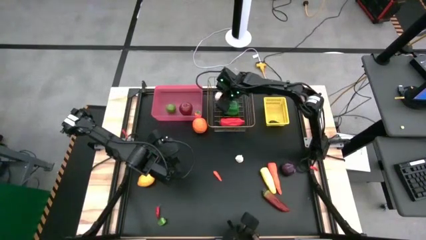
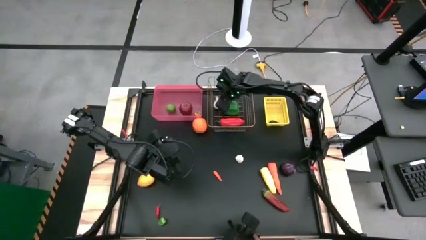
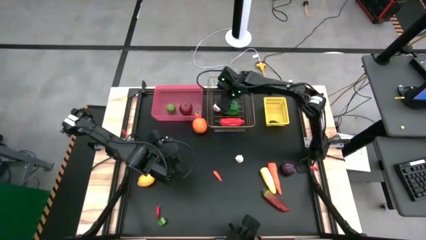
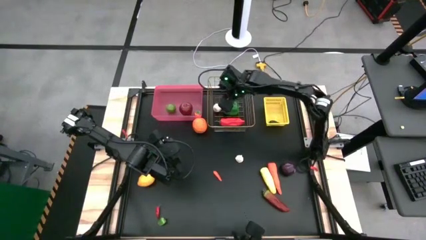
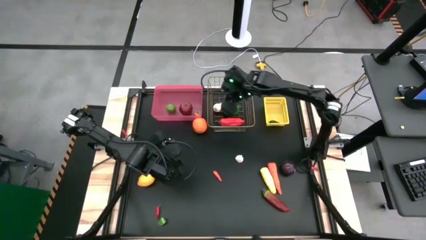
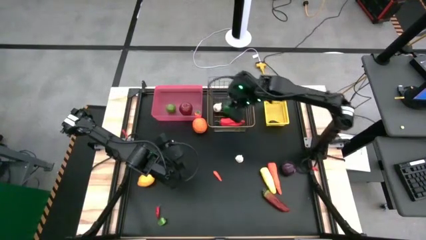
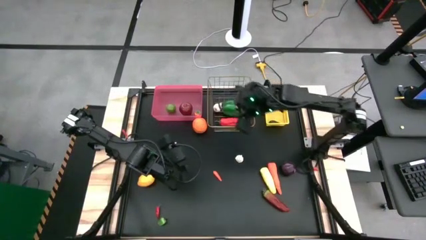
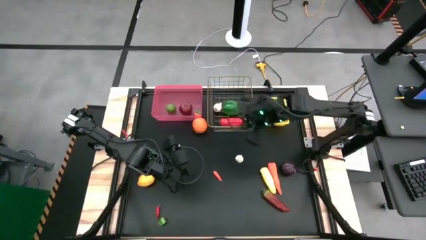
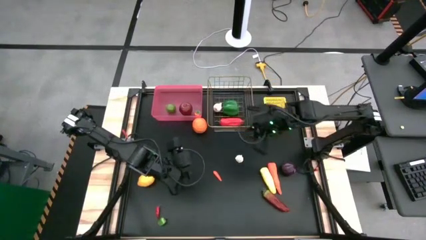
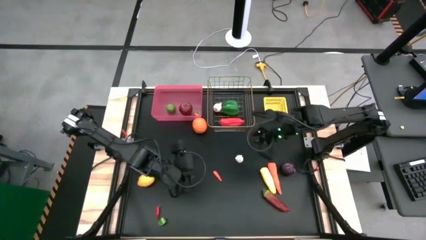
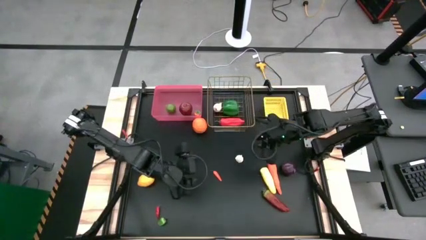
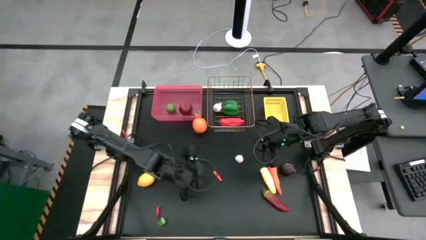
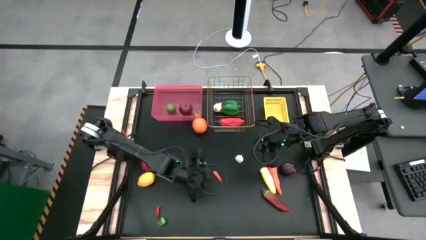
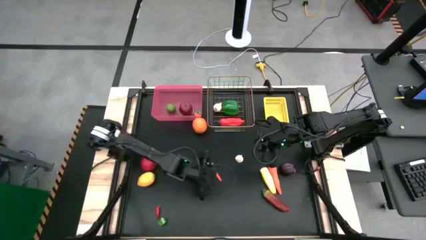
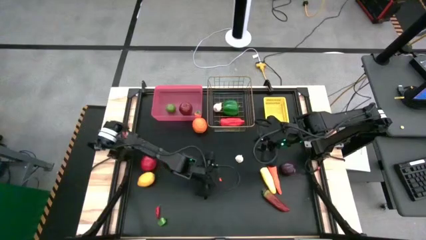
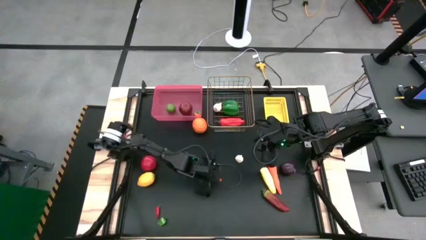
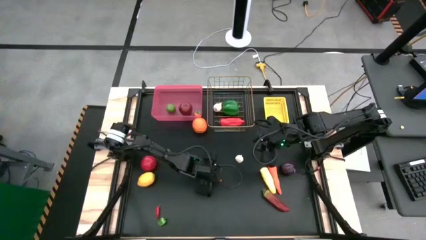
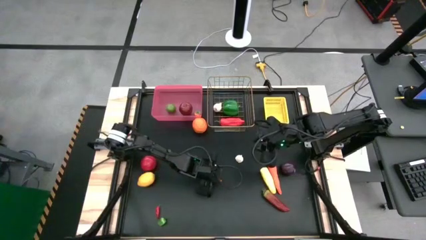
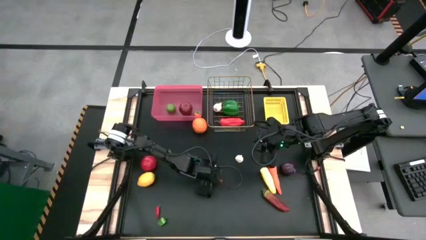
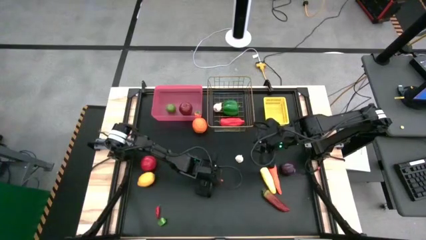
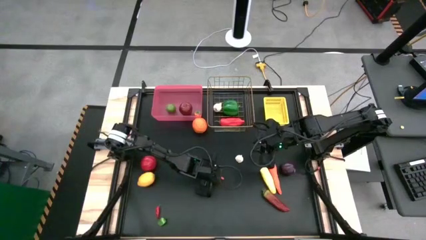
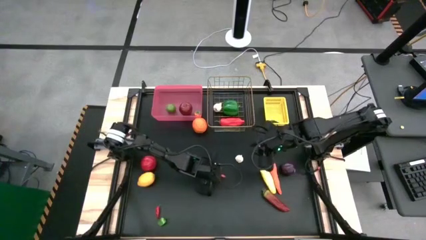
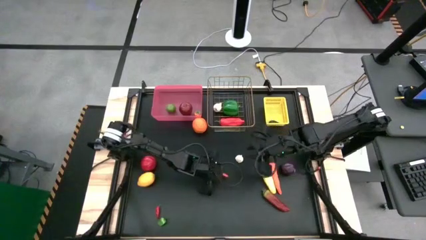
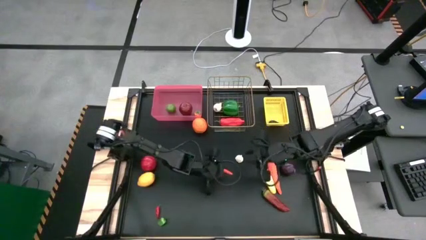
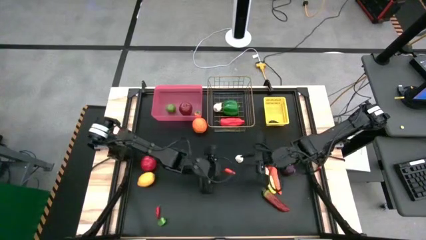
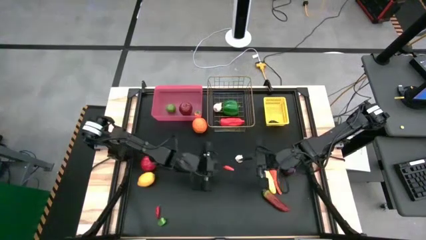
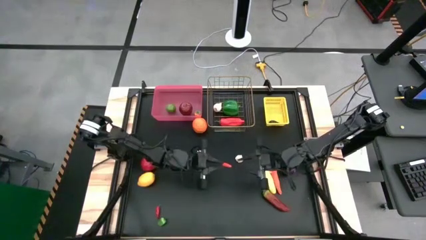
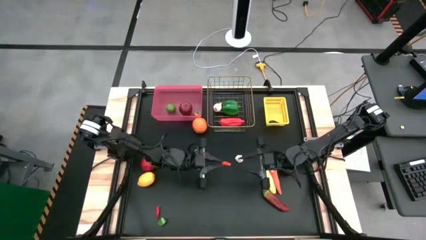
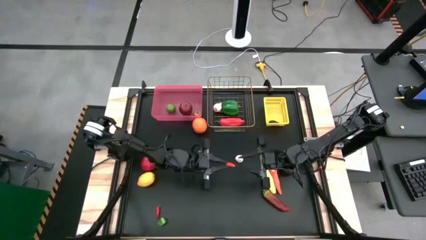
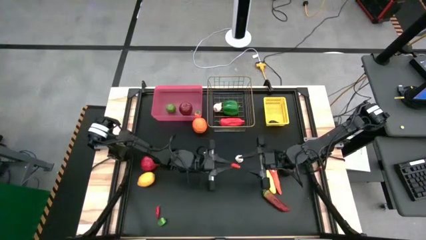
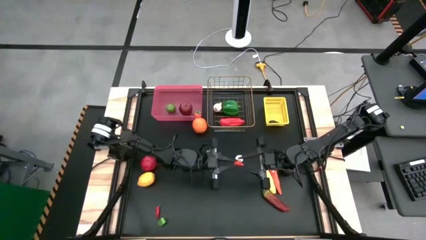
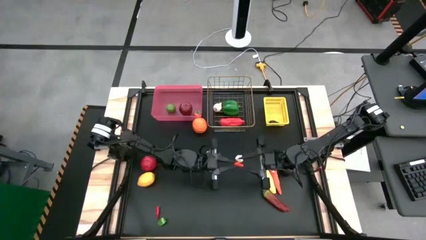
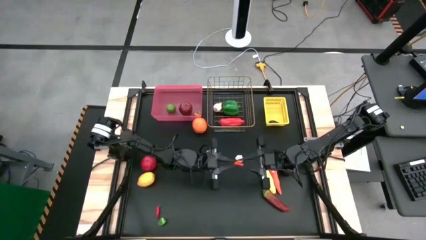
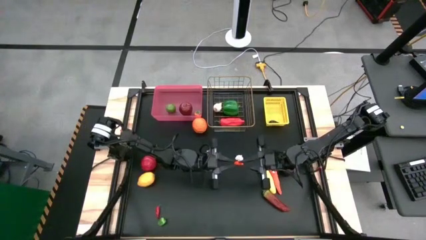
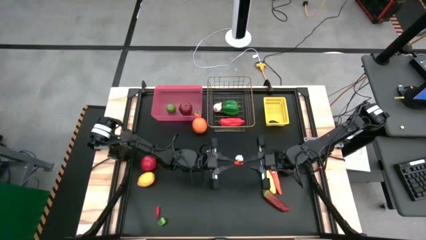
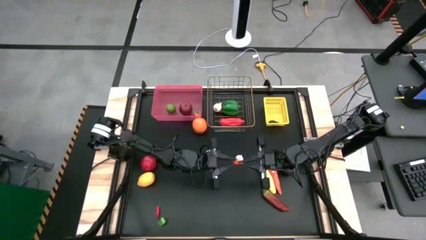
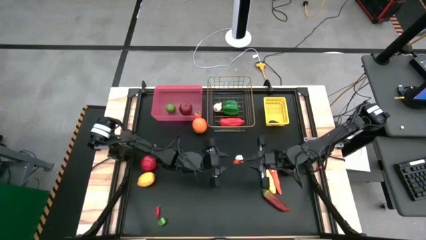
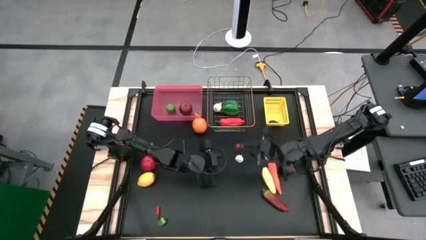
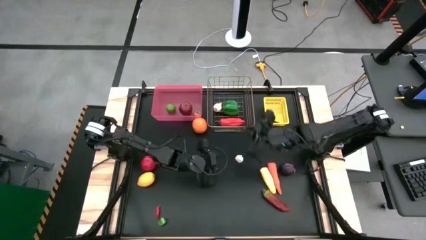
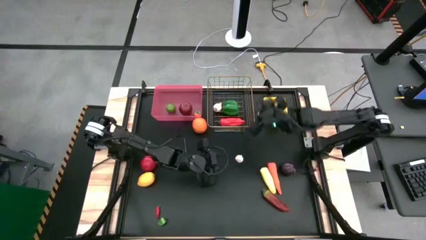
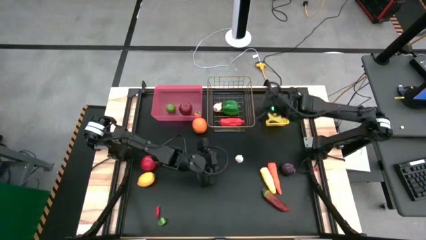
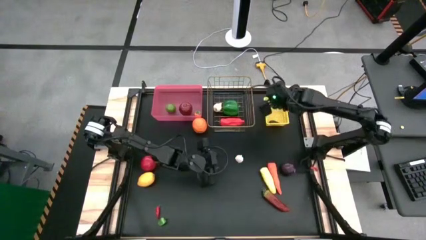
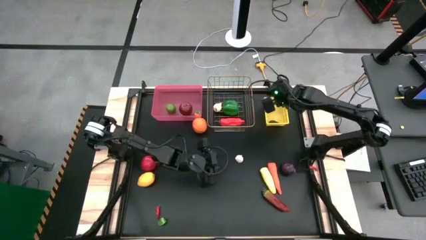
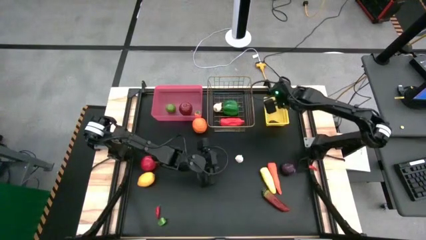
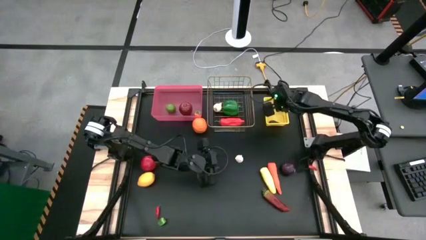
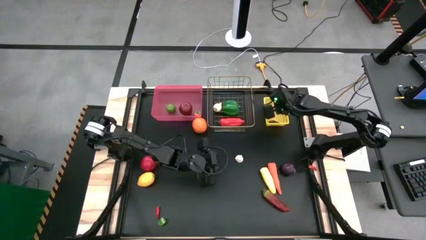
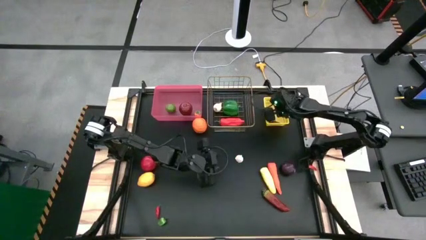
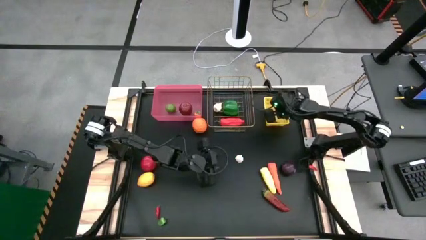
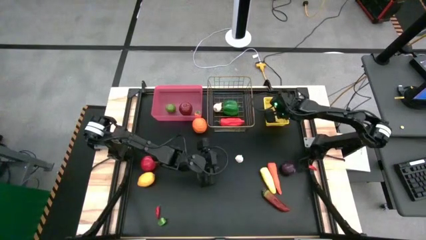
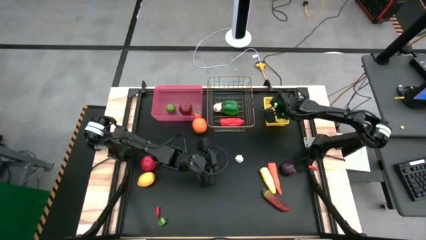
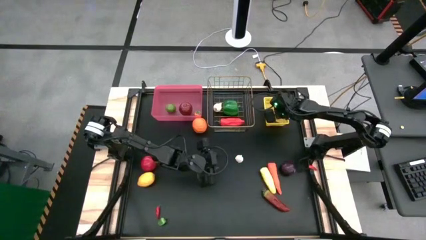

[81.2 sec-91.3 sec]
Task: Sort produce into baskets
Put the small orange chili pepper into the yellow bin

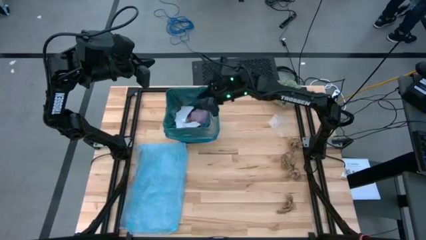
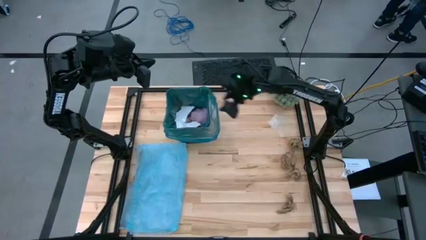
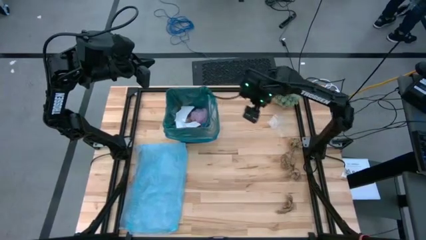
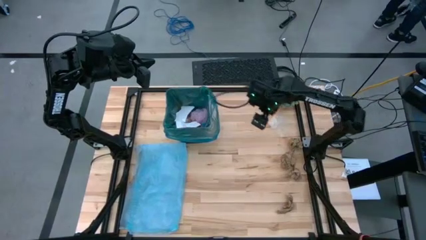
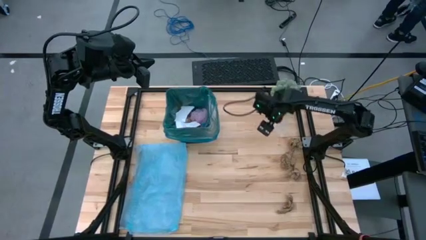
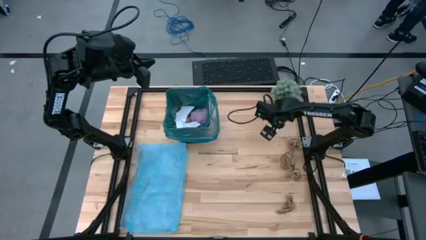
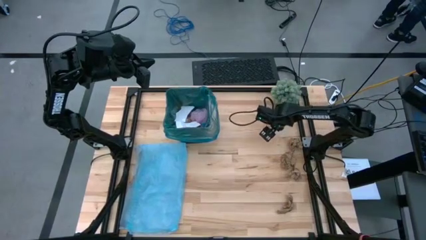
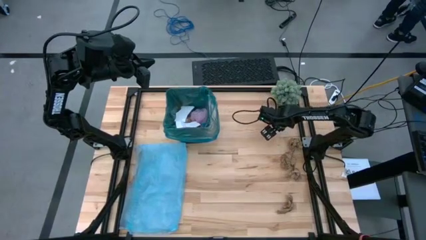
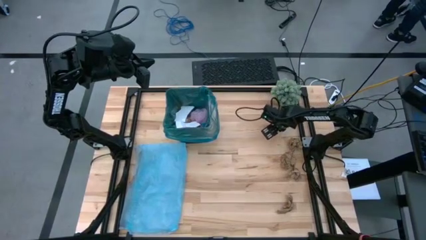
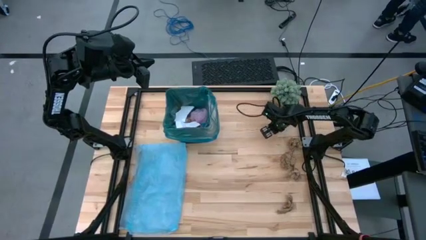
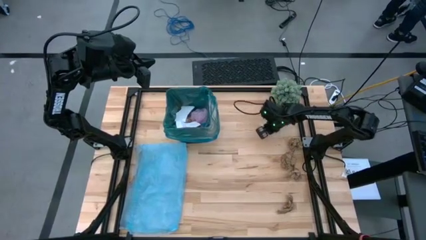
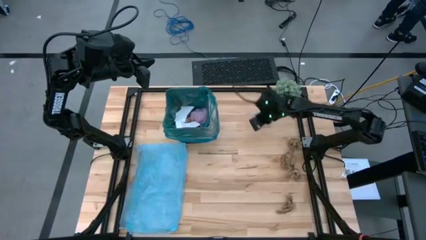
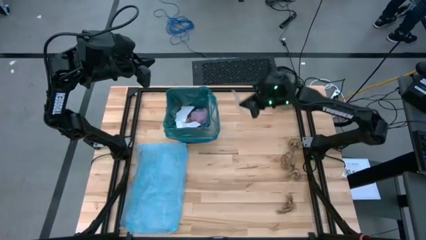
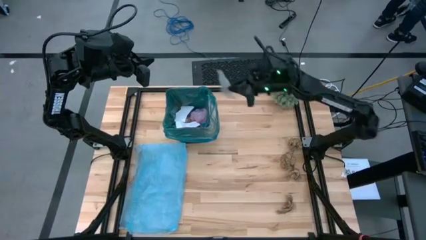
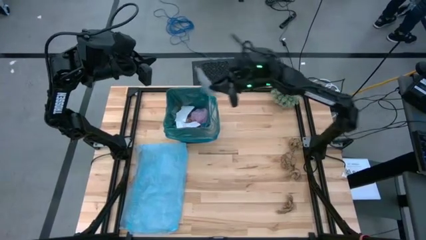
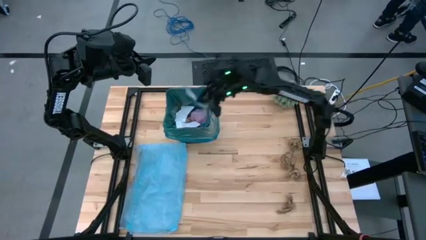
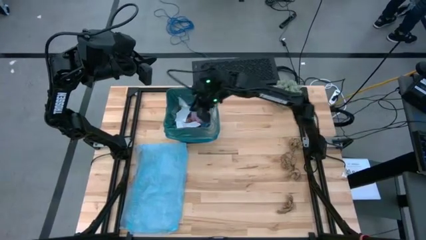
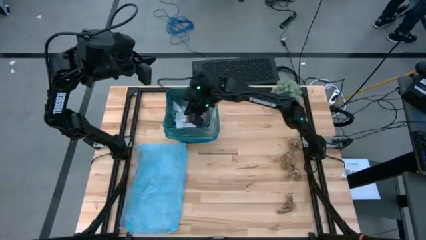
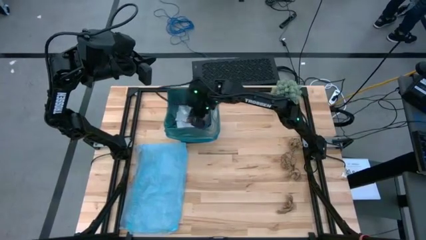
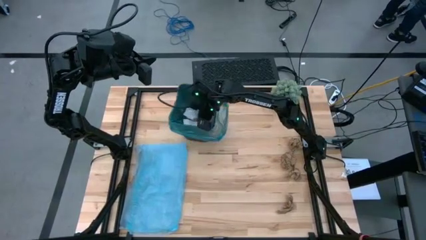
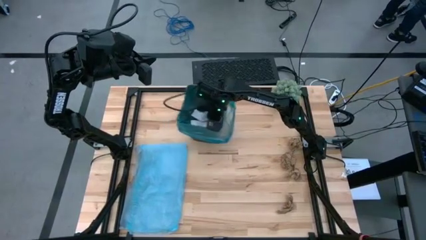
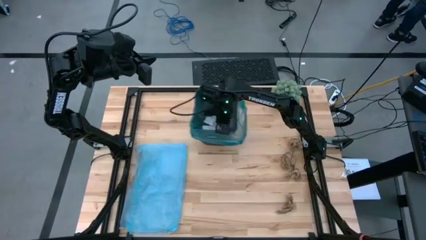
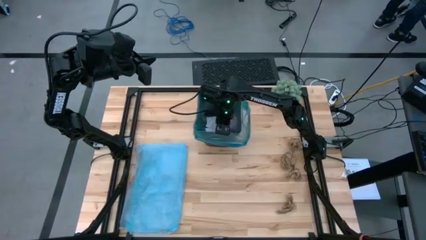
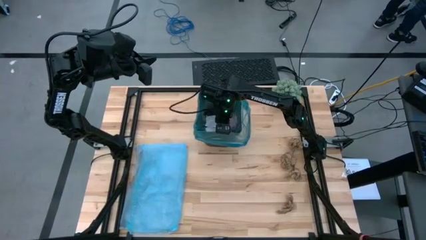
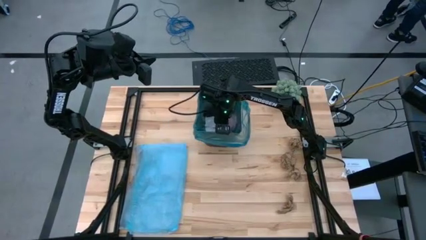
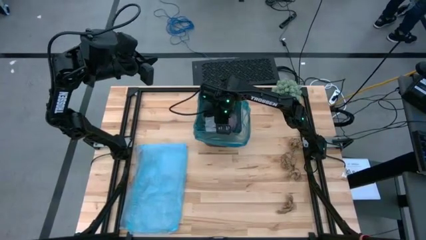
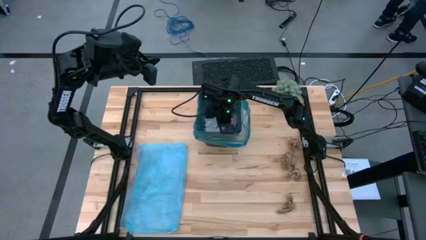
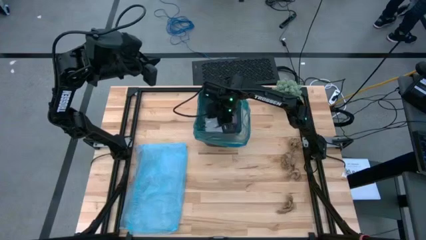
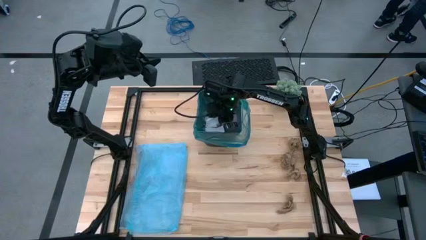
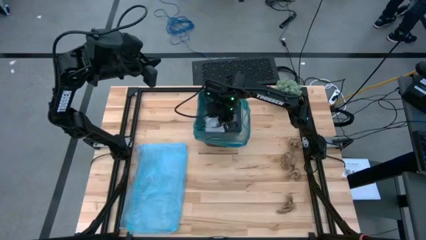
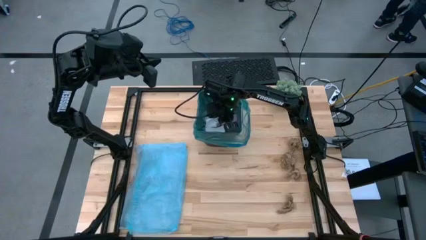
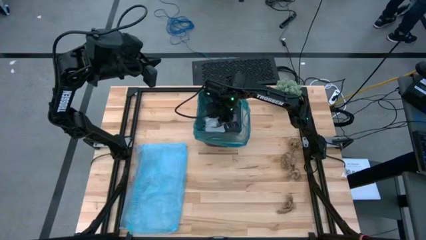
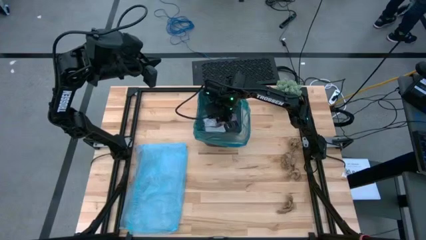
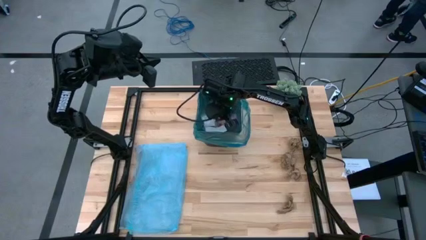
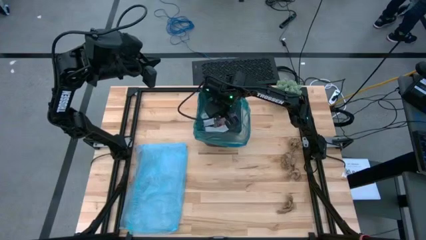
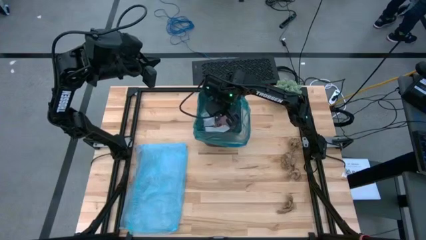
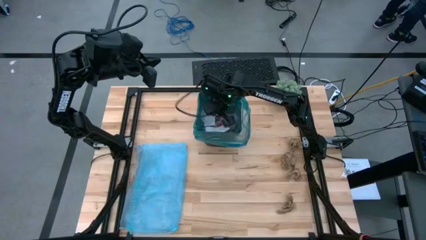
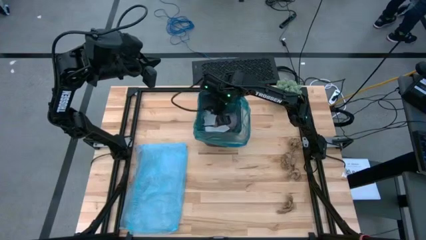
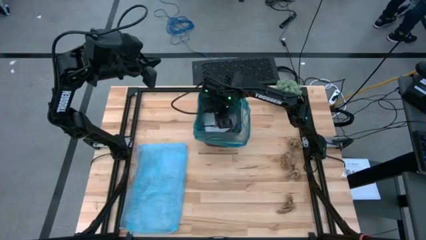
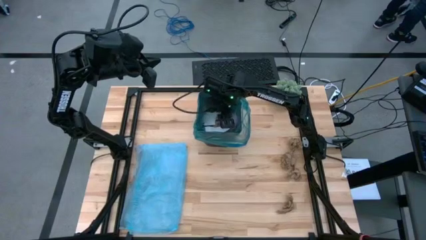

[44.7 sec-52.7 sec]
Task: place trash/remove bag and relplace
Put the transparent cellophane into the trash bin
